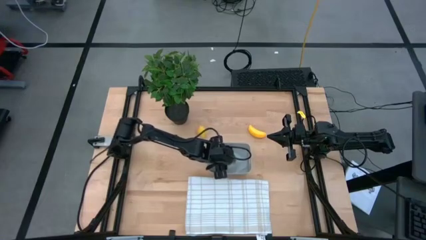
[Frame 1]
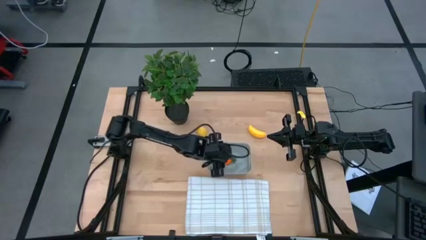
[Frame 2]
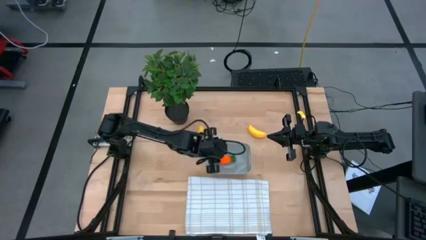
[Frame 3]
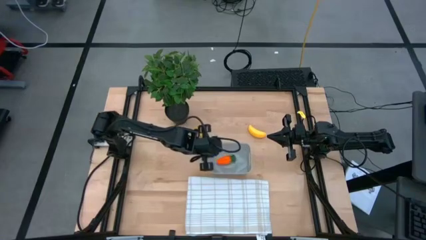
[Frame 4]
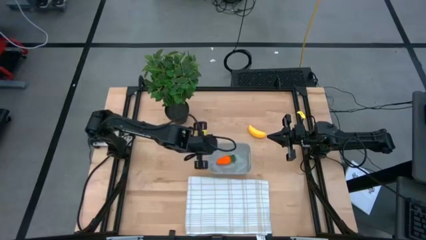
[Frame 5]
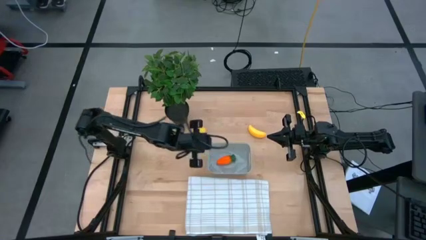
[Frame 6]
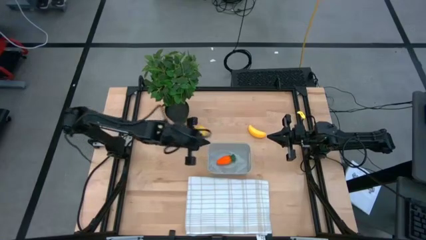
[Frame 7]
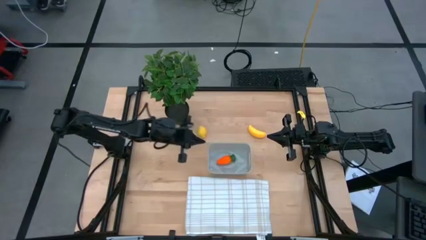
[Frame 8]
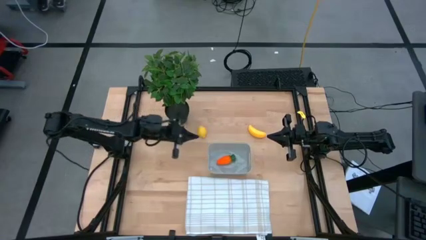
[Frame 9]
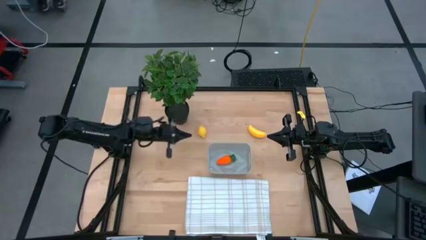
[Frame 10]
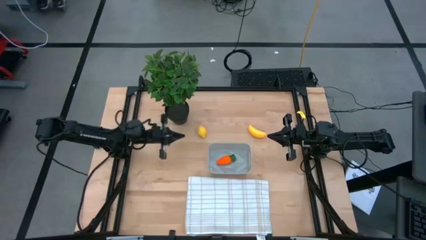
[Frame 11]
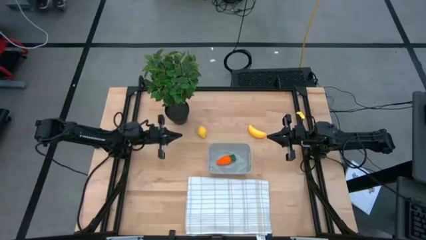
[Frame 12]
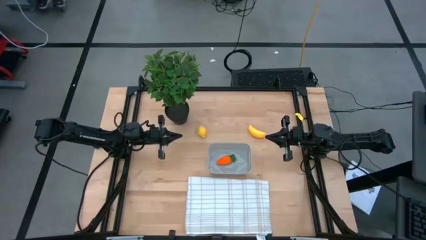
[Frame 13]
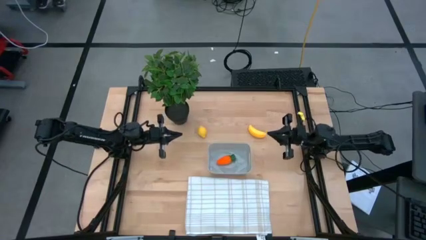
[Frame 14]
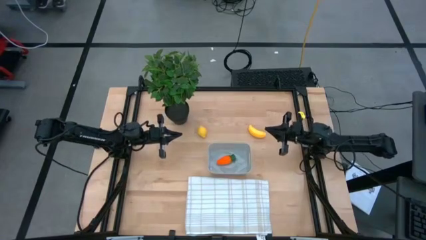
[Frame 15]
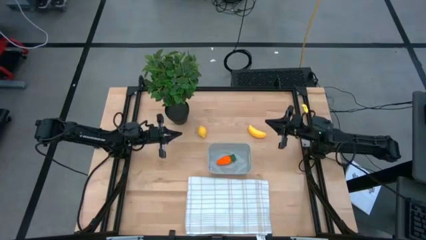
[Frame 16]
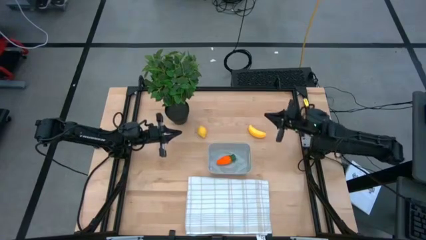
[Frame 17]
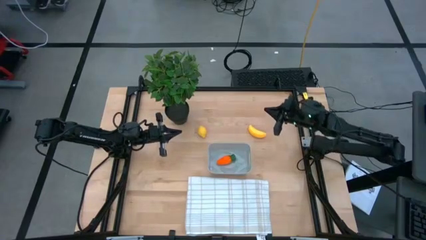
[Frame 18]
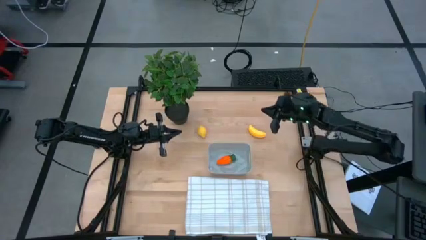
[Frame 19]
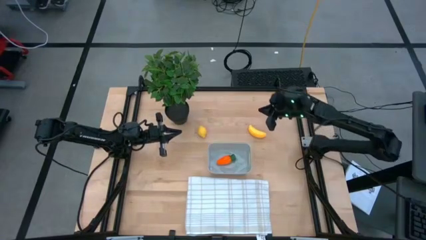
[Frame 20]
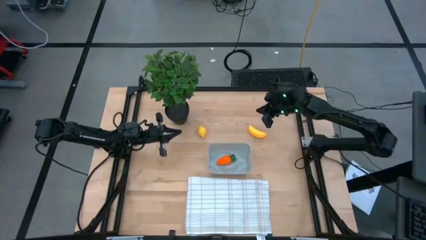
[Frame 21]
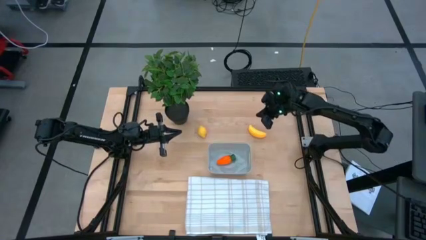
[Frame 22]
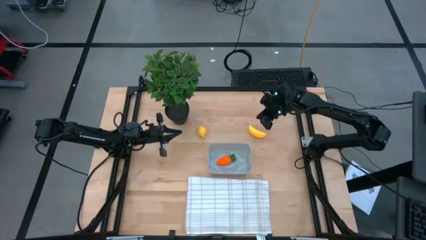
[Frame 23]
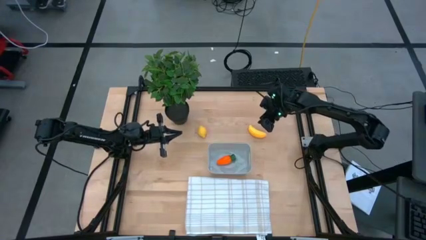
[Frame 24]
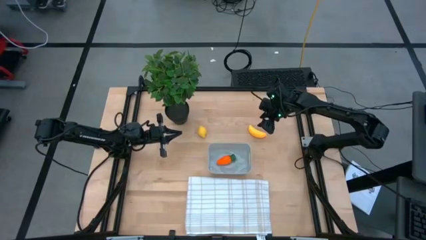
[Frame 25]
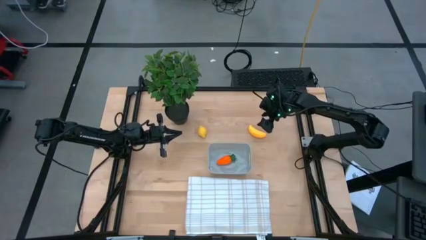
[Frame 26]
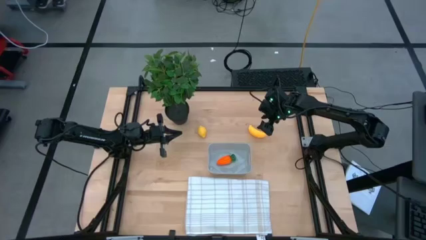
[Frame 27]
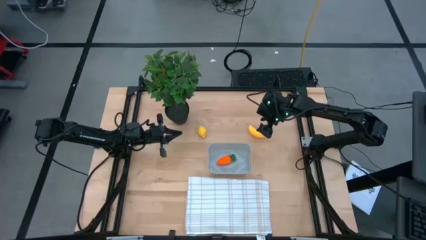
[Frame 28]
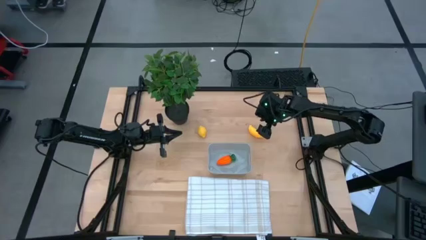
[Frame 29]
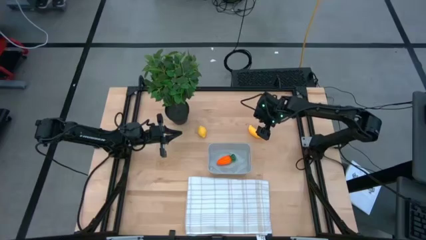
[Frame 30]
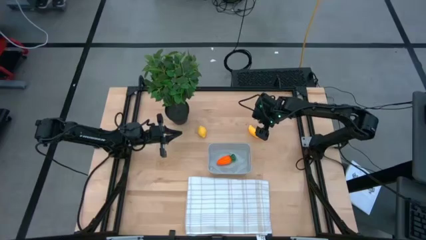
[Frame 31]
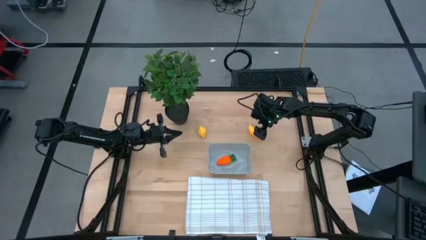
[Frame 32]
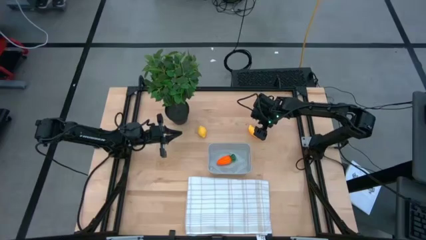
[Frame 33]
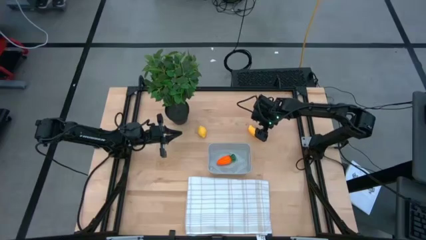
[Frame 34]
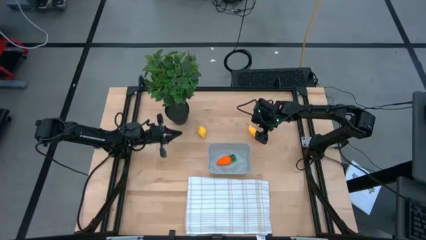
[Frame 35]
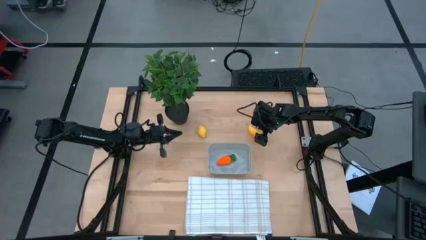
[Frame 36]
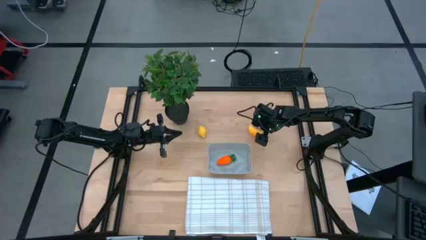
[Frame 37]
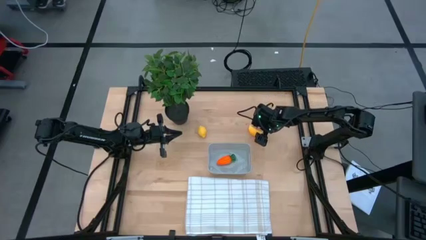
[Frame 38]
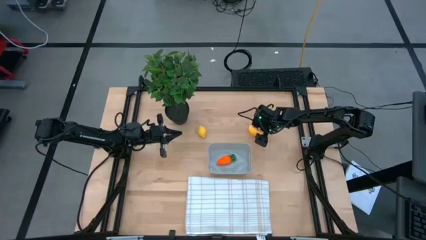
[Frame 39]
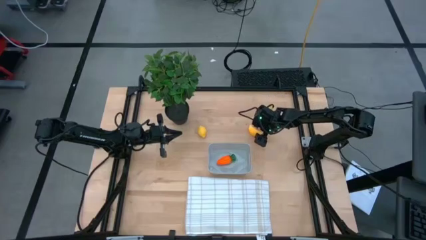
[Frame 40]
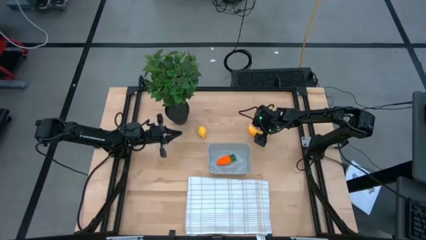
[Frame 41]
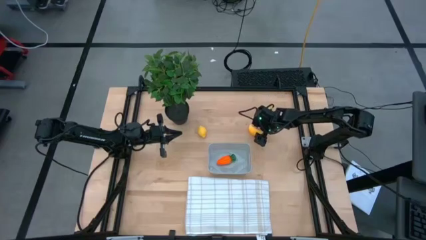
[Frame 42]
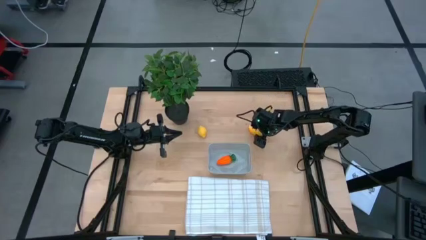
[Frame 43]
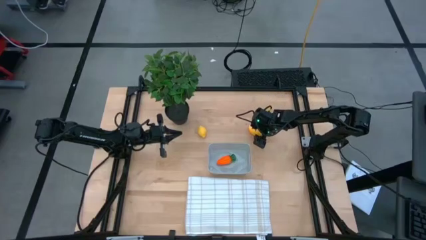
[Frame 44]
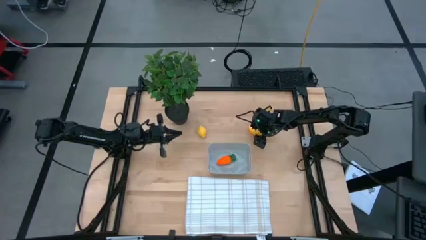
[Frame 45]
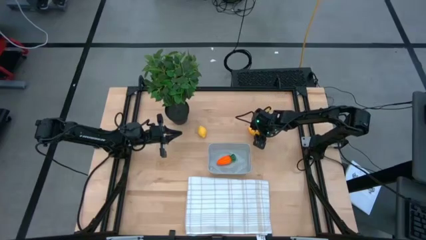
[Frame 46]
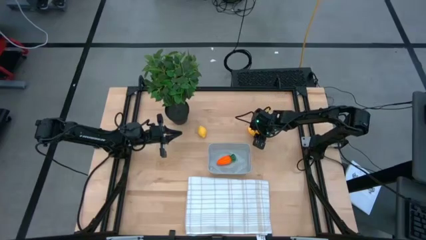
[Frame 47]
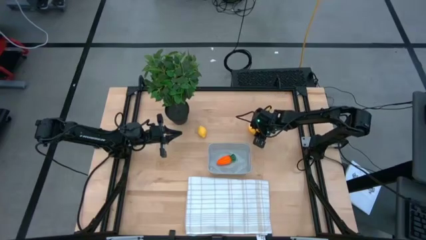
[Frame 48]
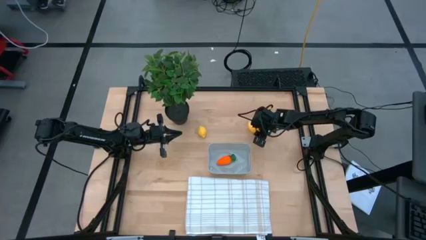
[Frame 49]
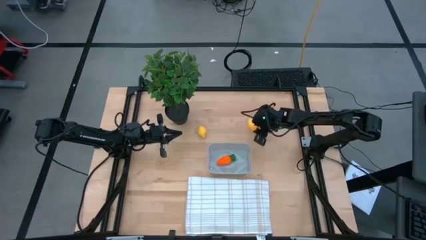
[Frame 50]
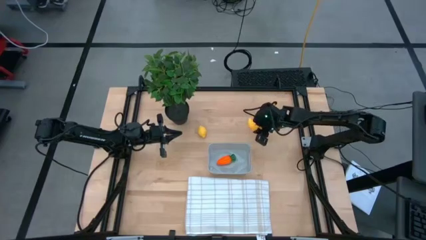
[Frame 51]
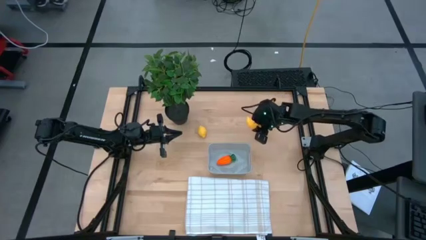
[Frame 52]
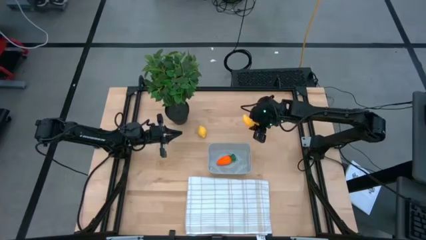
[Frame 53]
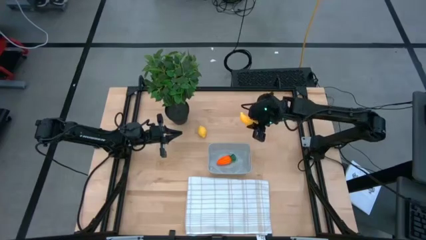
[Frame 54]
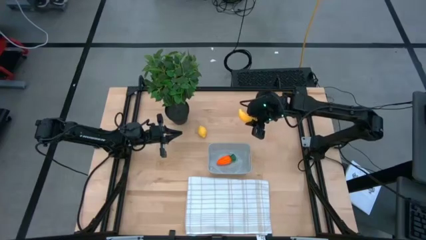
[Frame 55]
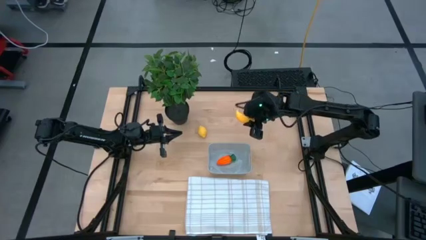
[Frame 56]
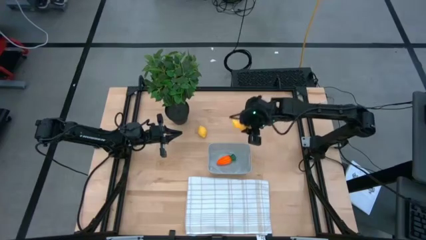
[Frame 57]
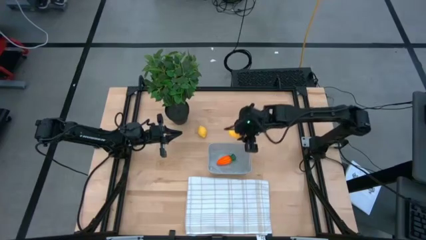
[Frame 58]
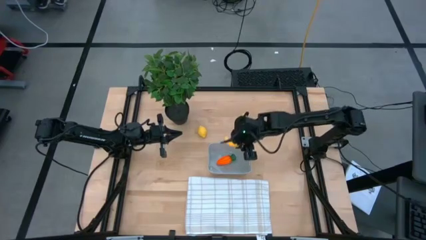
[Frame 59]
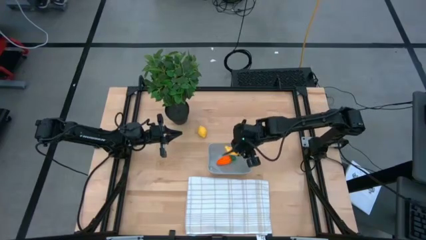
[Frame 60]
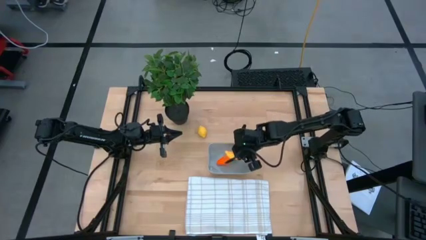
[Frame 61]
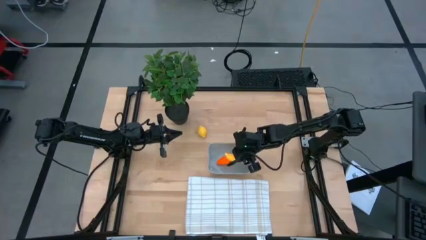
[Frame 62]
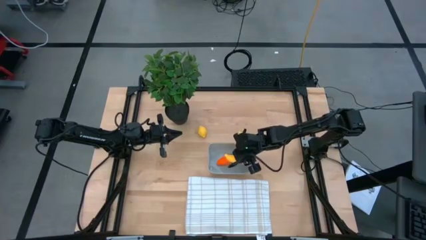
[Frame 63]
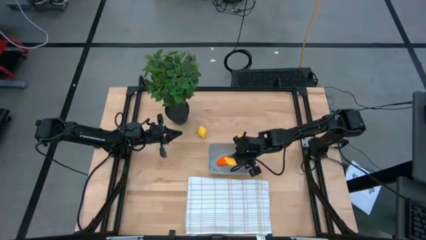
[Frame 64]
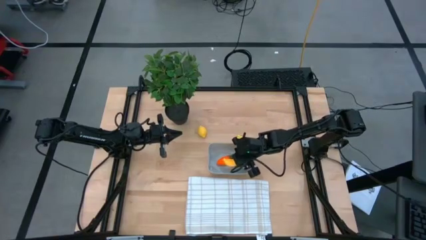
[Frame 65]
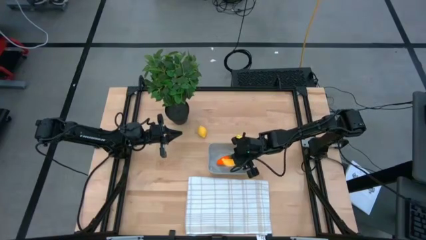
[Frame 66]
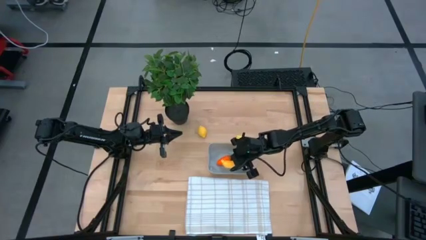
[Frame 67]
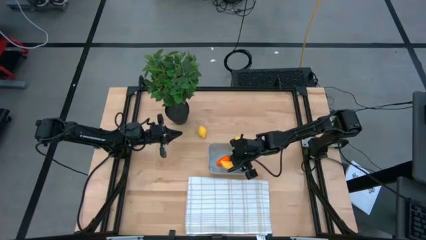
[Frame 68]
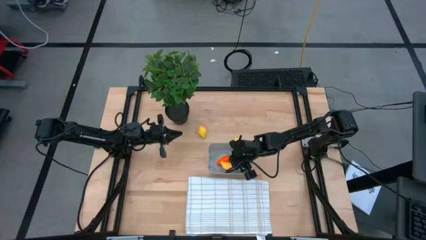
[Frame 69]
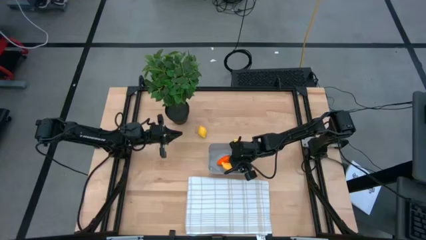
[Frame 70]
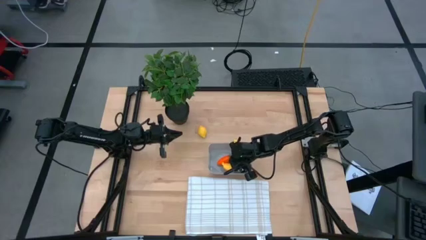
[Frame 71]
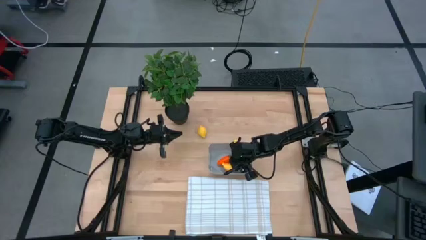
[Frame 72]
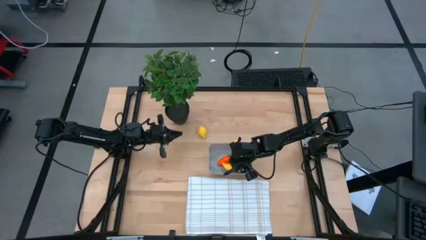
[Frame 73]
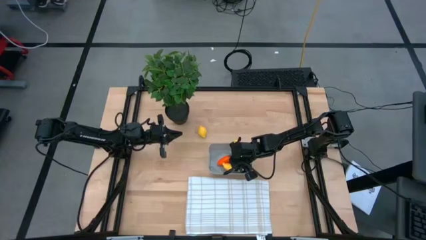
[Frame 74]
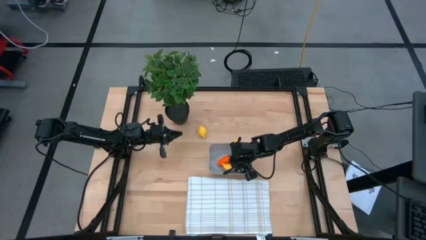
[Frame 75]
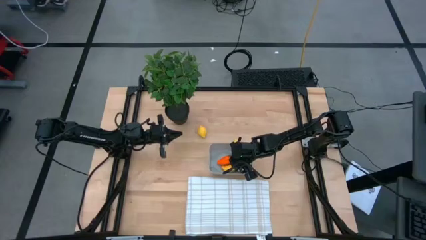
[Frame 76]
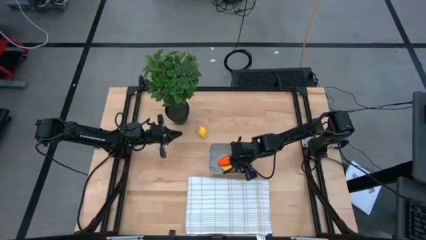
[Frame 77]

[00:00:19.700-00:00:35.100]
Task: Pick and placing Produce into tupperware
Put the banana into the gray bin
